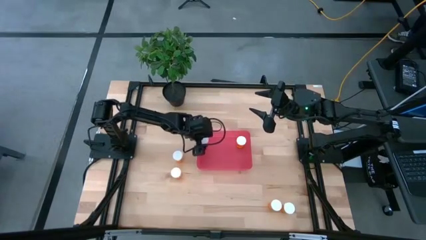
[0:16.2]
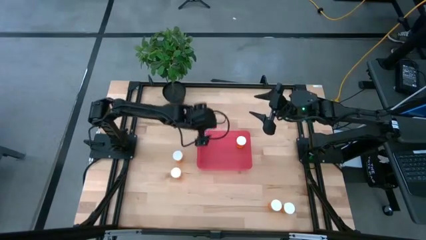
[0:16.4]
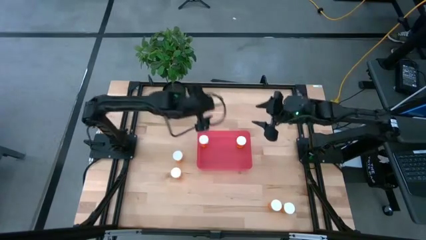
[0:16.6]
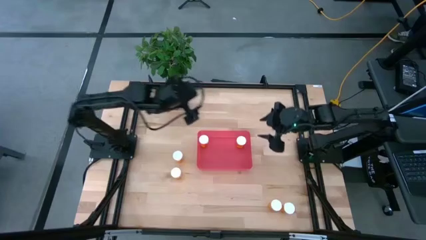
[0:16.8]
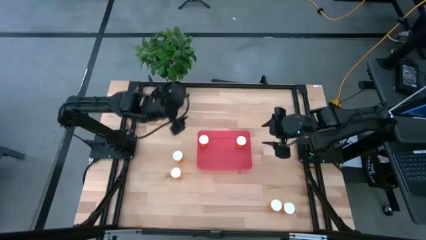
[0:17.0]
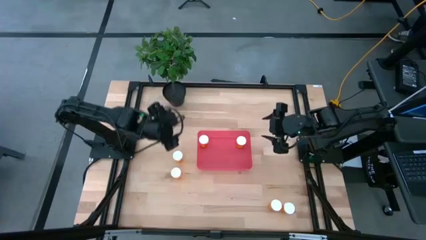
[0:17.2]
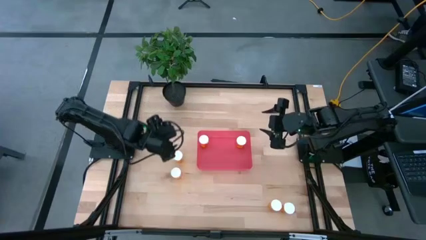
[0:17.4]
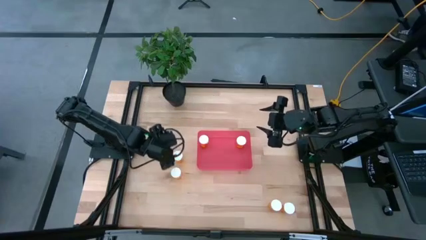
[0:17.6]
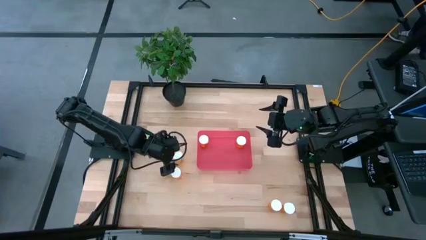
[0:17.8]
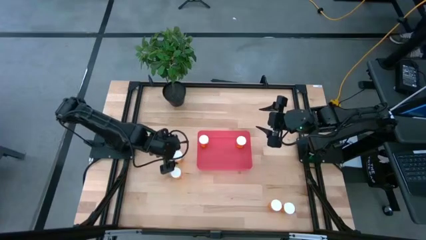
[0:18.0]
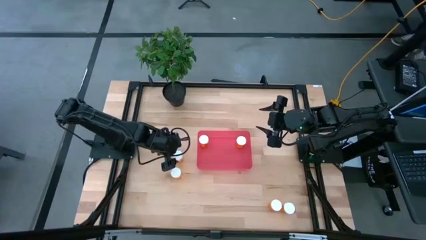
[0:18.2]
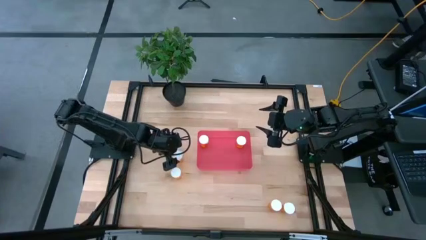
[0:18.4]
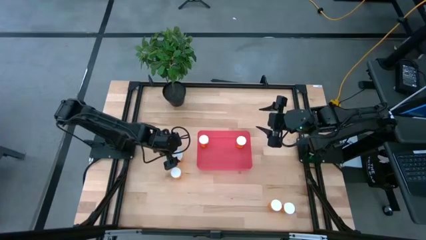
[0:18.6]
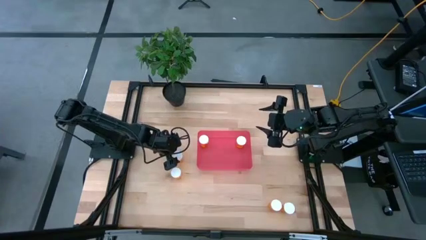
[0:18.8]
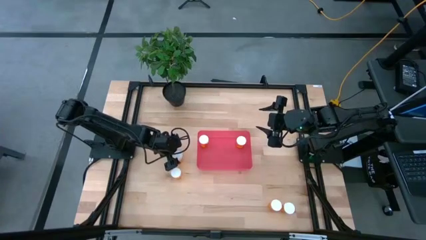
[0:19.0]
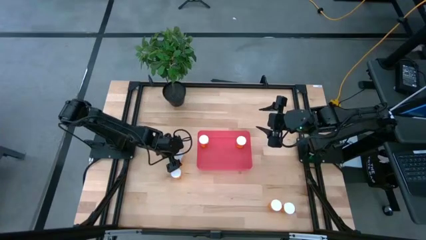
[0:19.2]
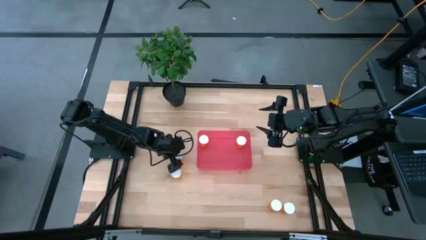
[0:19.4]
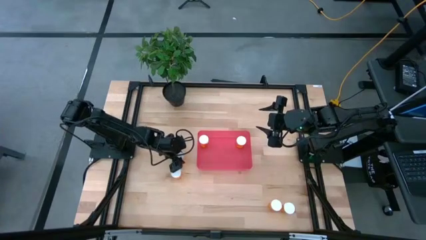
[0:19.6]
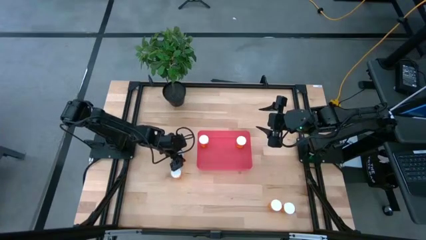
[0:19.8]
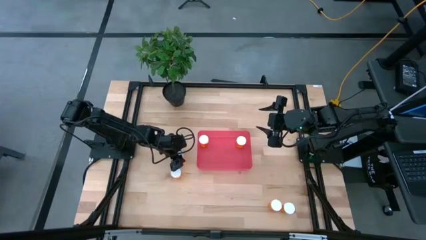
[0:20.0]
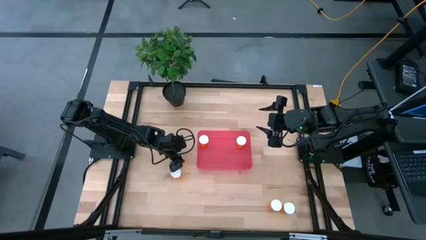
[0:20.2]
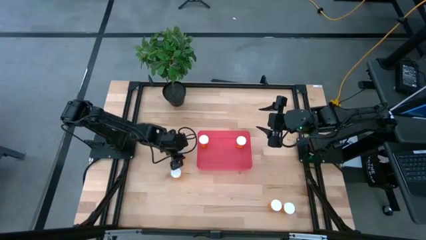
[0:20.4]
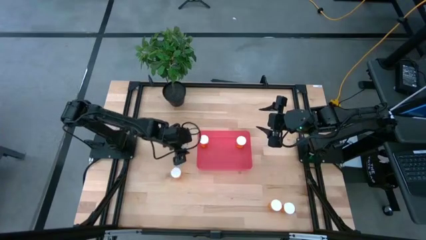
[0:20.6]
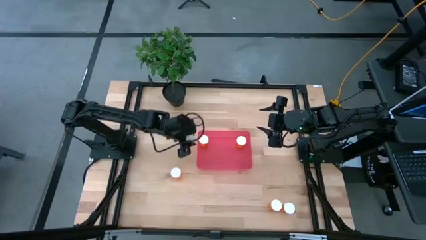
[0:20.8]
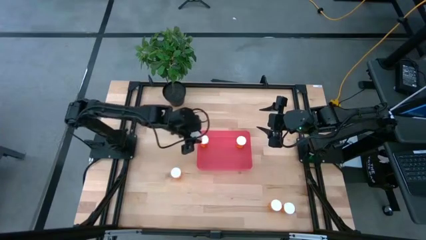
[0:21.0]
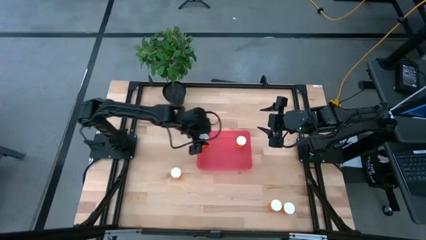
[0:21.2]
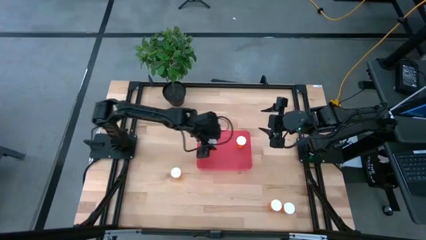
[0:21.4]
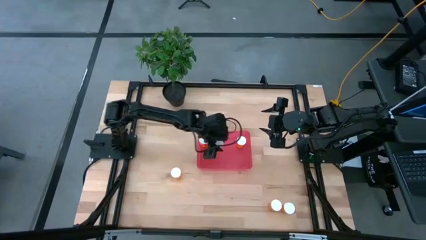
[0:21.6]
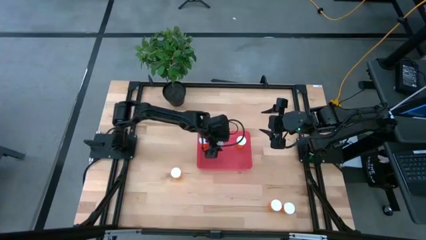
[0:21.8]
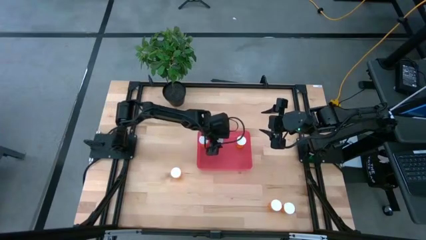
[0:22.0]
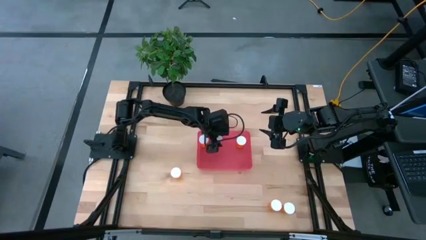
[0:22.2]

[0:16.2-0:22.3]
Task: Pick and place pill bottles into a basket
Put the orange pill bottle into the red bin

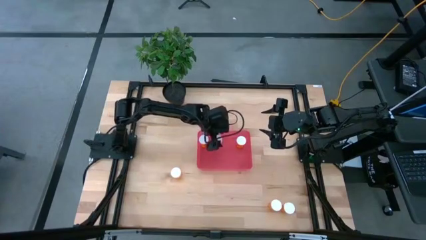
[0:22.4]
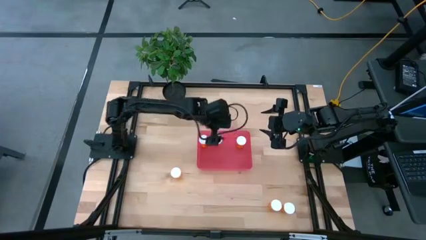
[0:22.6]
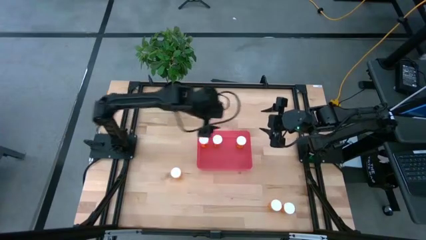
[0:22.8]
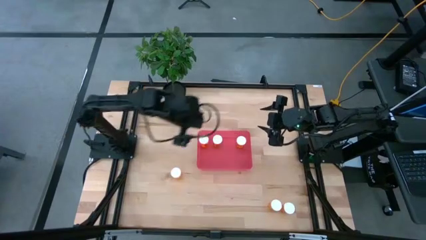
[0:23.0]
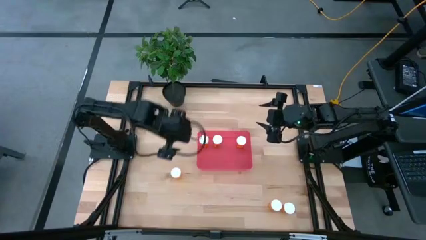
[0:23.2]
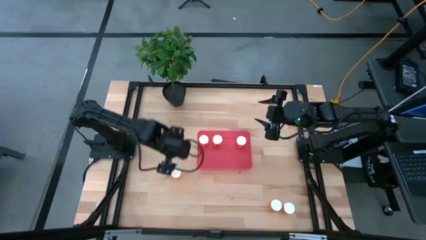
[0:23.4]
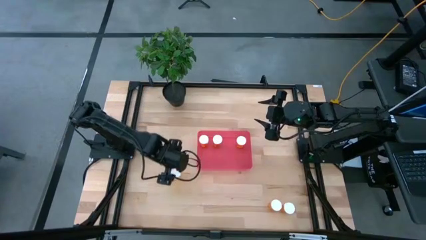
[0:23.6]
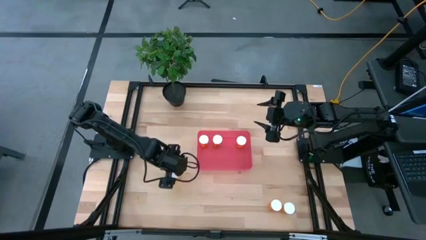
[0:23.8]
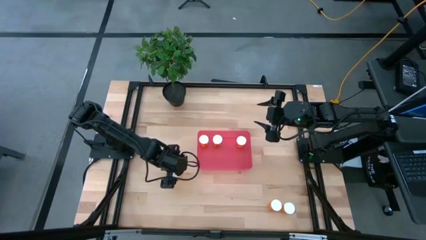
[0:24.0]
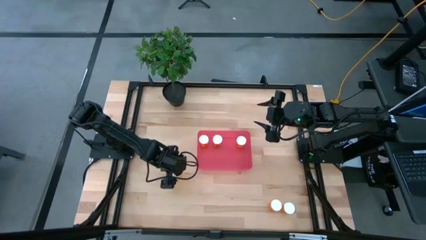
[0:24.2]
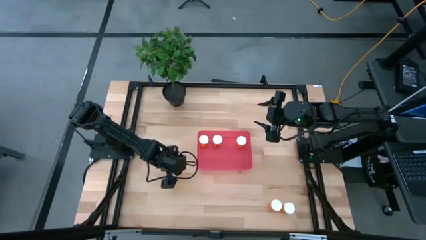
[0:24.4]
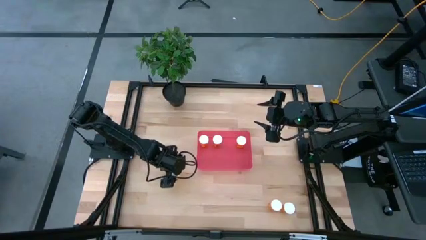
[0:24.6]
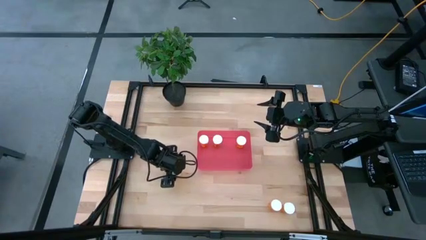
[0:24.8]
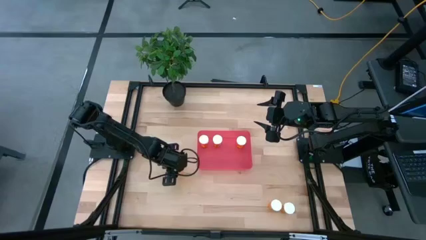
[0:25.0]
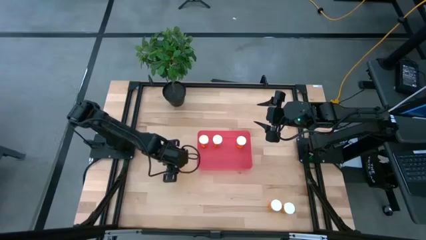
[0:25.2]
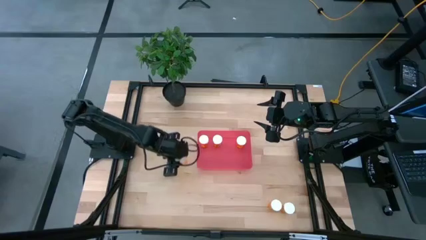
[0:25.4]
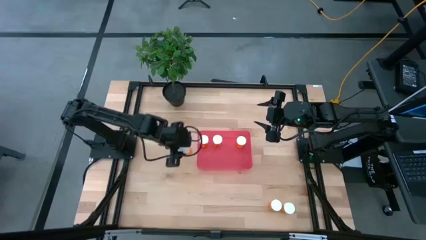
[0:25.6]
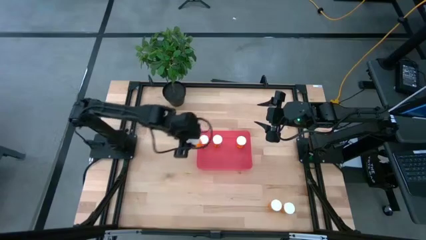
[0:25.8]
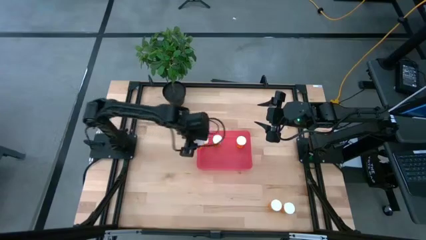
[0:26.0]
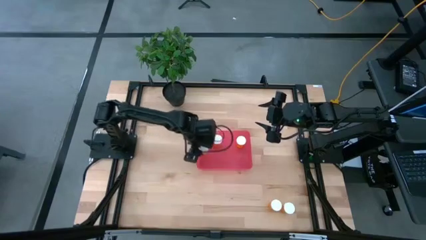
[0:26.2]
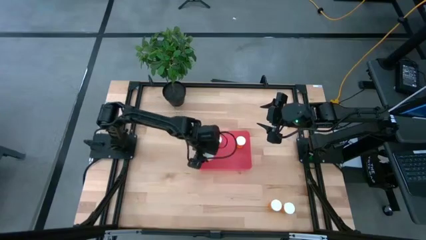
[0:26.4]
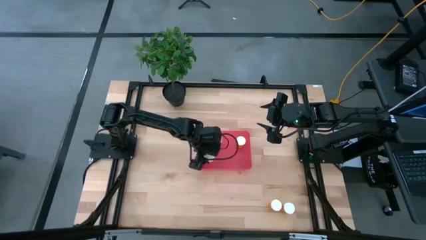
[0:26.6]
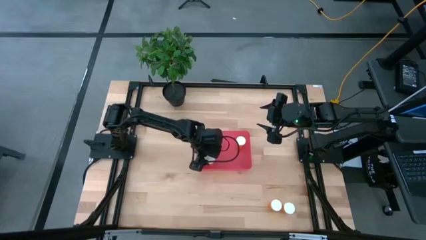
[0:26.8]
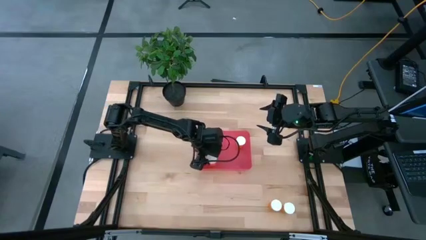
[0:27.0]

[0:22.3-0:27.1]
Put the top orange pill bottle into the red bin

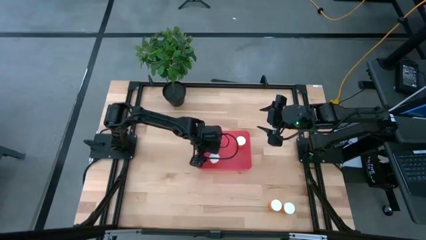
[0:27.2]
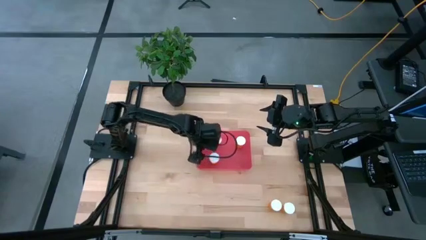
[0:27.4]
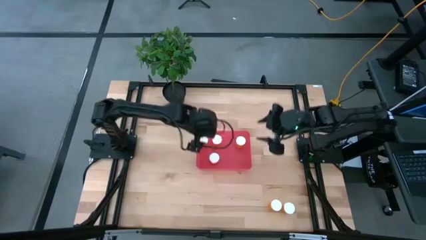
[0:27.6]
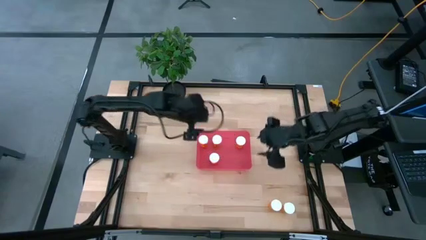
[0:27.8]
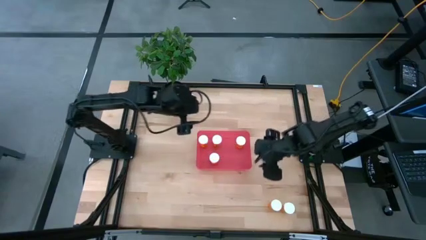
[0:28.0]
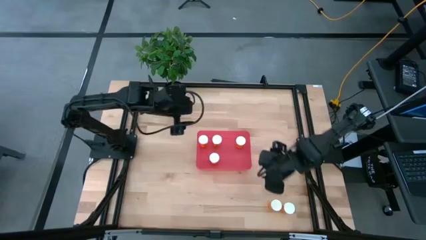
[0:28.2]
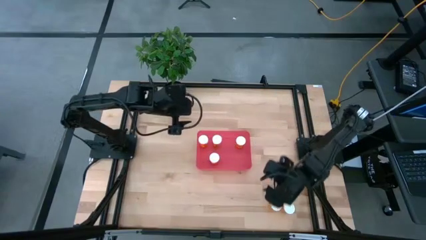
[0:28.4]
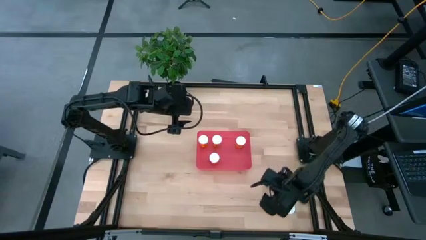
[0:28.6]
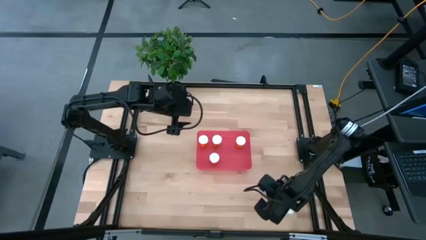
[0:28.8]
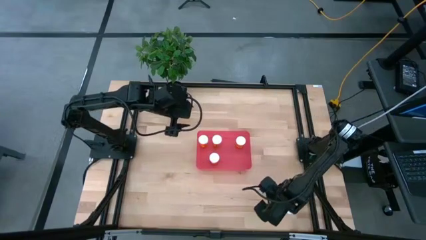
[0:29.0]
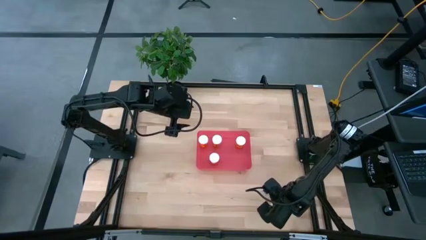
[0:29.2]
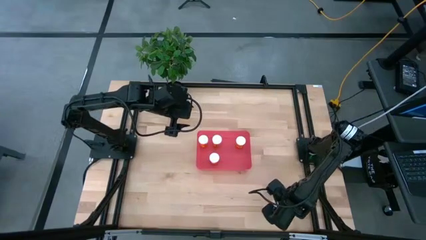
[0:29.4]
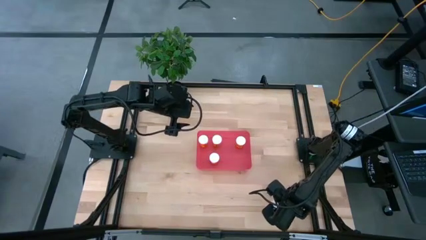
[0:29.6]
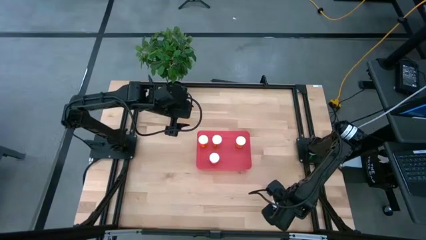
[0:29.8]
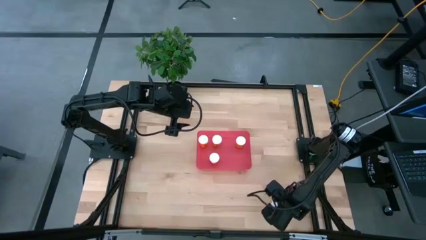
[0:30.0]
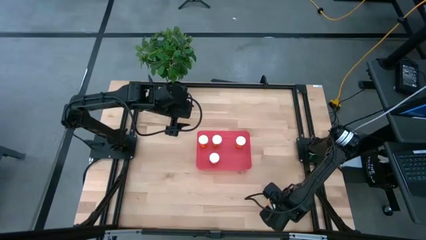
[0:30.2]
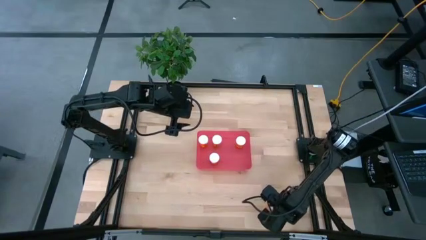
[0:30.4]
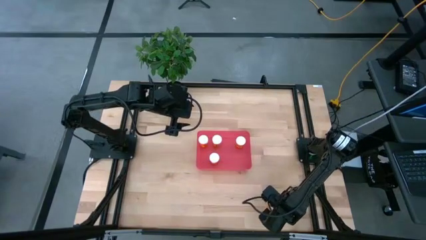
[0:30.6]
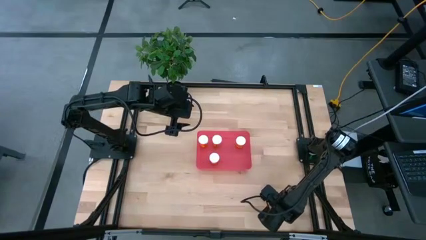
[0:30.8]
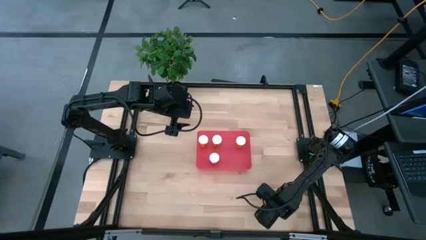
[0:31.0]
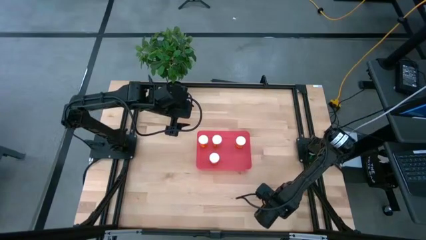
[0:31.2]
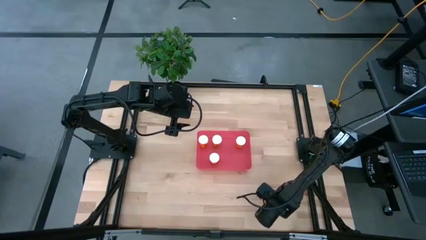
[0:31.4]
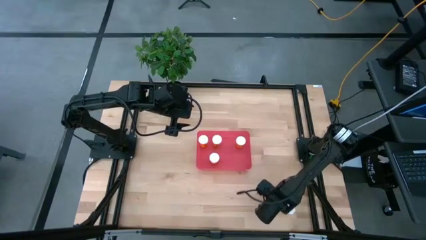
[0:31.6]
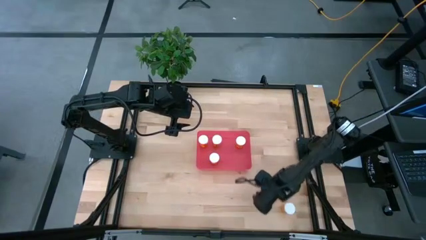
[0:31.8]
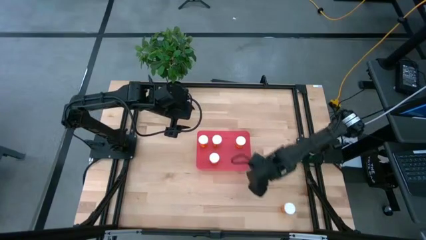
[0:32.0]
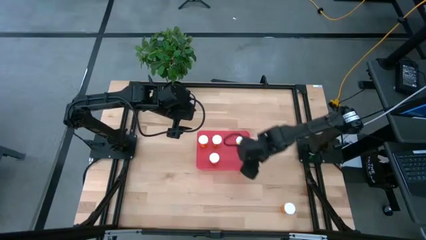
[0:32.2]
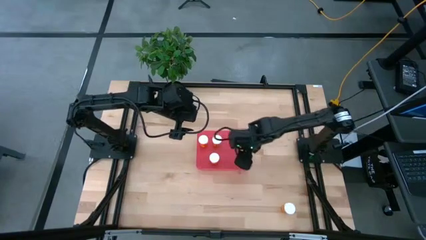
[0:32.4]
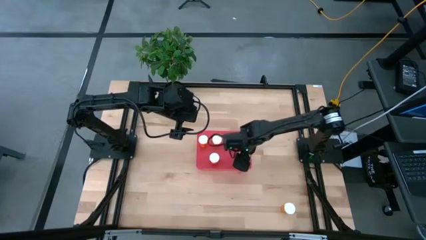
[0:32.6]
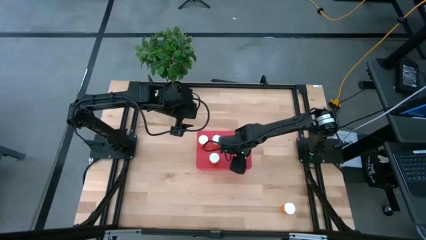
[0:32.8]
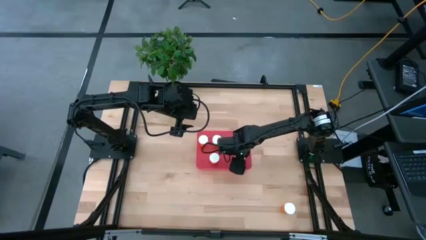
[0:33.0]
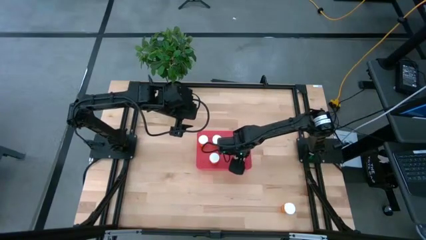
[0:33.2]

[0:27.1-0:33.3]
Put the left orange pill bottle into the red bin
